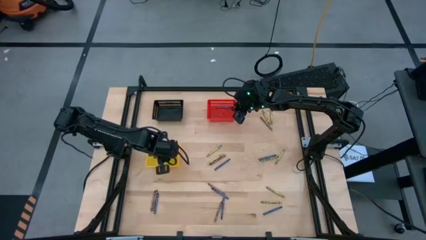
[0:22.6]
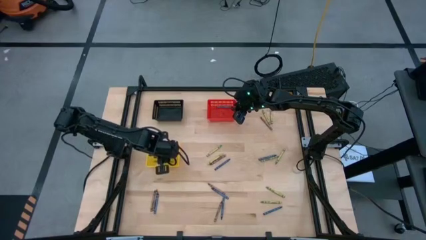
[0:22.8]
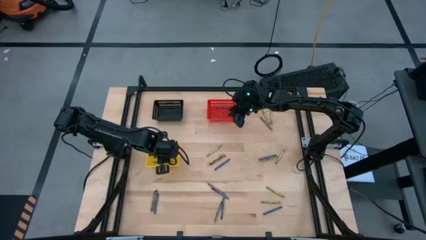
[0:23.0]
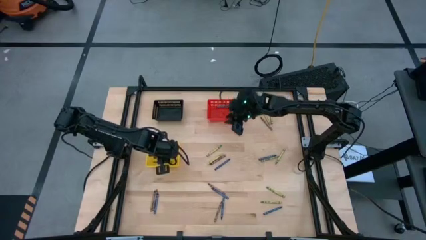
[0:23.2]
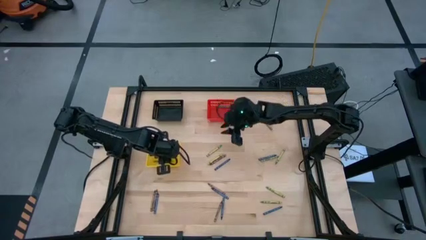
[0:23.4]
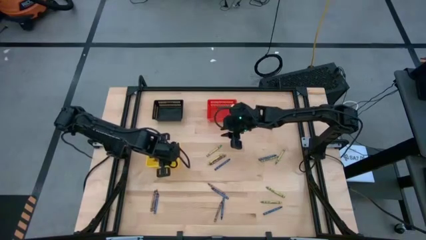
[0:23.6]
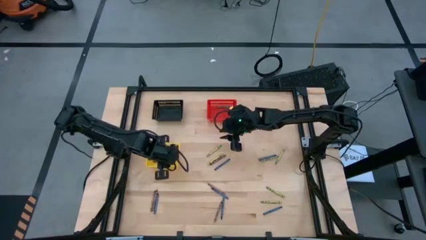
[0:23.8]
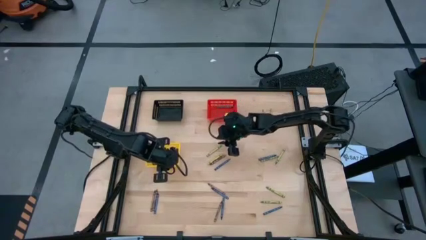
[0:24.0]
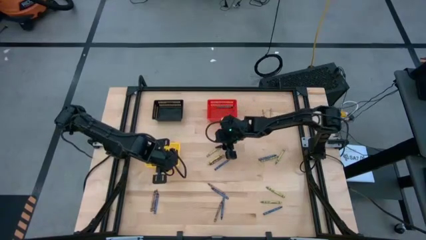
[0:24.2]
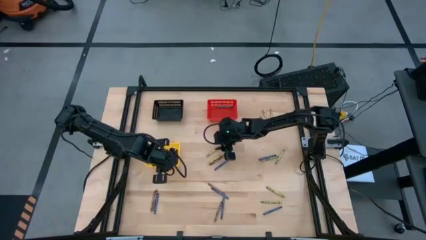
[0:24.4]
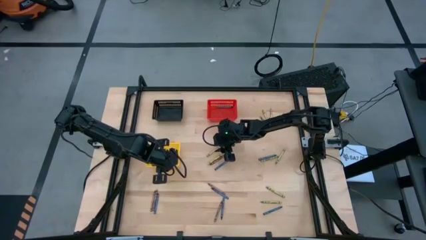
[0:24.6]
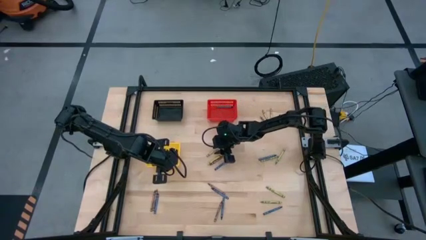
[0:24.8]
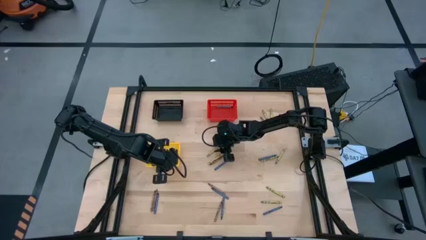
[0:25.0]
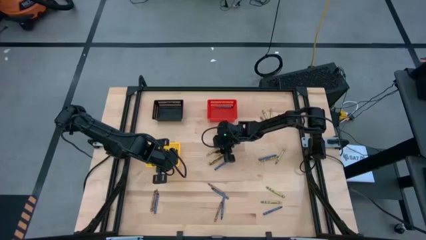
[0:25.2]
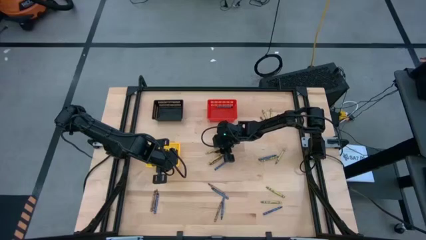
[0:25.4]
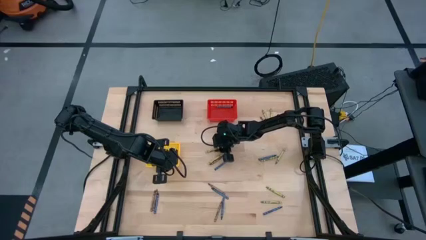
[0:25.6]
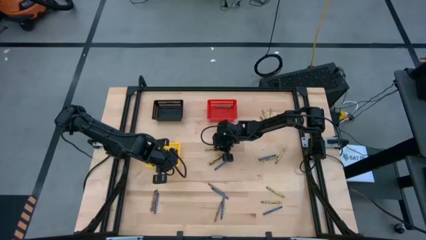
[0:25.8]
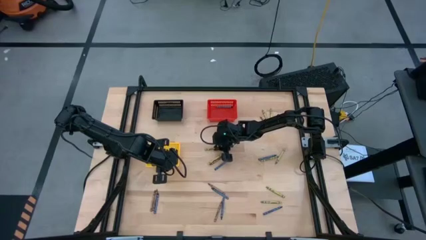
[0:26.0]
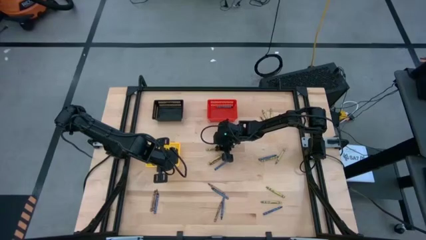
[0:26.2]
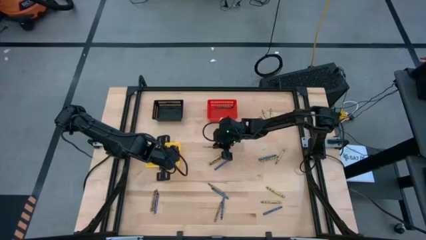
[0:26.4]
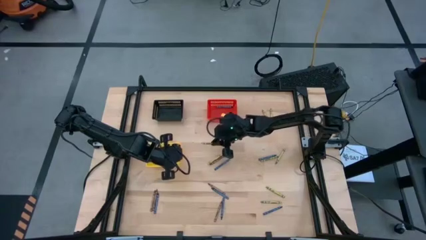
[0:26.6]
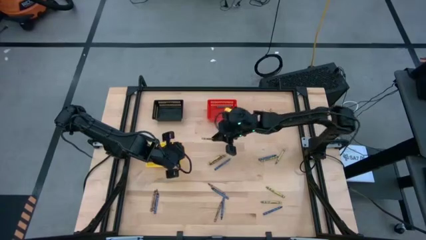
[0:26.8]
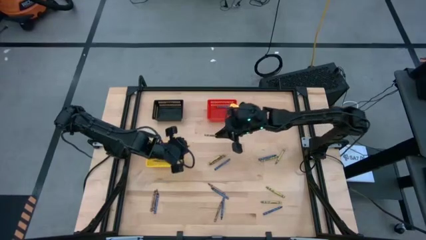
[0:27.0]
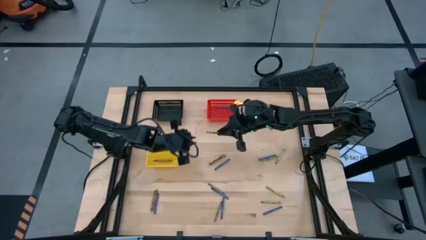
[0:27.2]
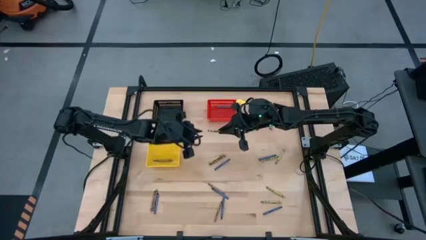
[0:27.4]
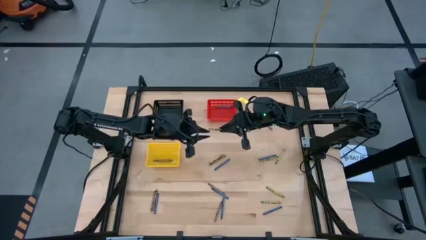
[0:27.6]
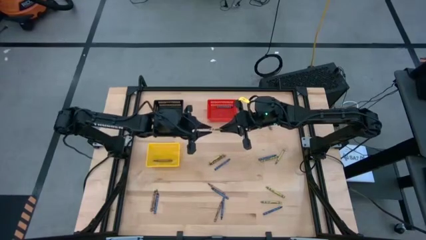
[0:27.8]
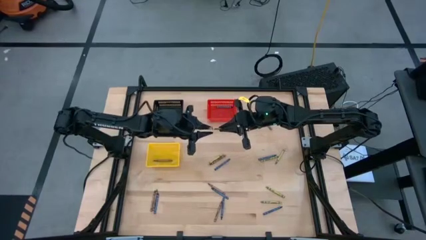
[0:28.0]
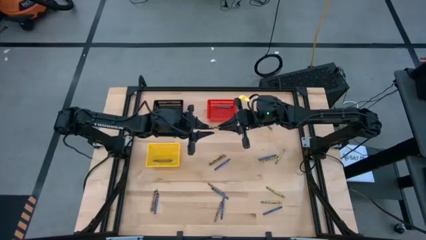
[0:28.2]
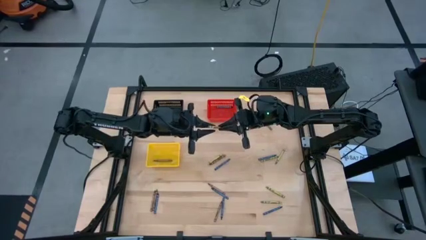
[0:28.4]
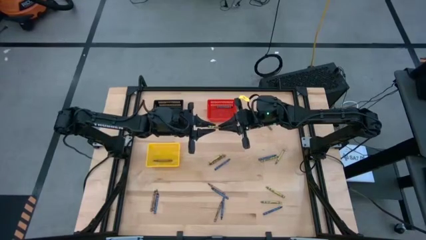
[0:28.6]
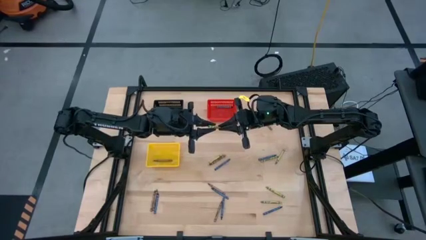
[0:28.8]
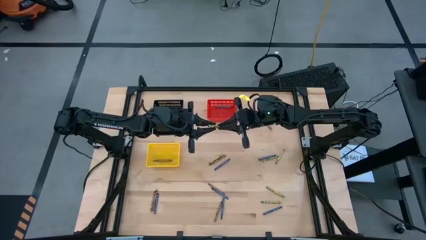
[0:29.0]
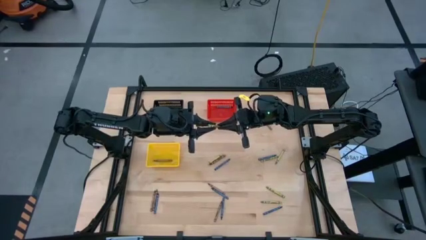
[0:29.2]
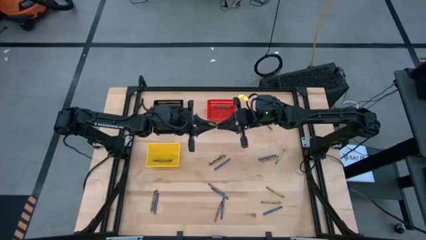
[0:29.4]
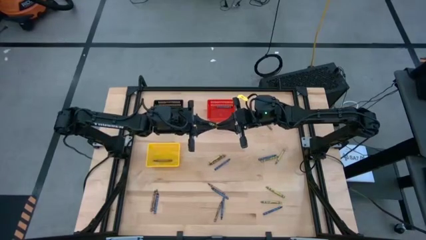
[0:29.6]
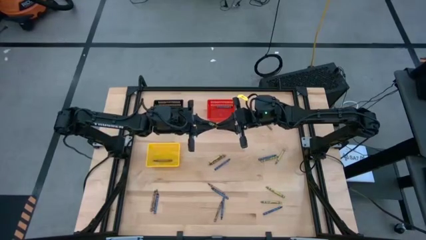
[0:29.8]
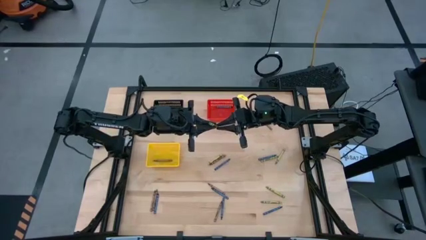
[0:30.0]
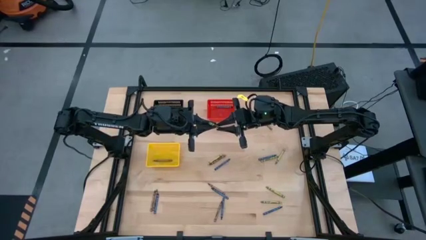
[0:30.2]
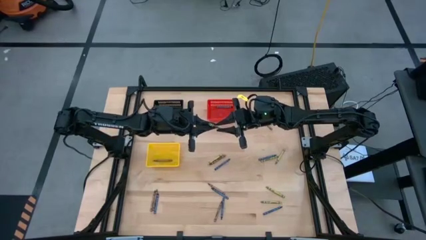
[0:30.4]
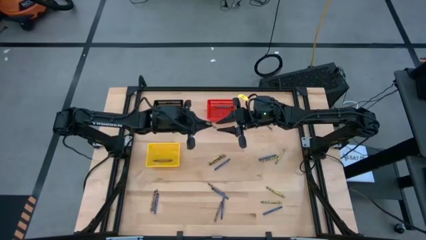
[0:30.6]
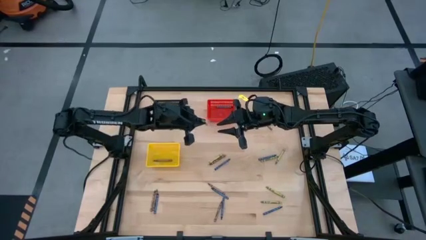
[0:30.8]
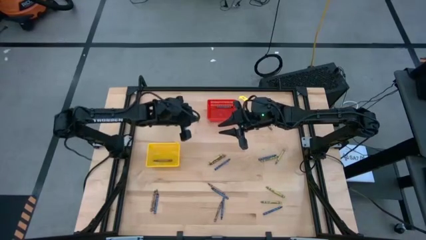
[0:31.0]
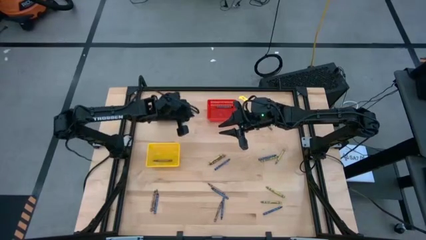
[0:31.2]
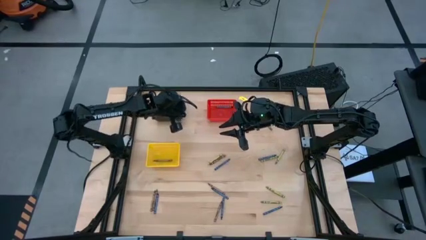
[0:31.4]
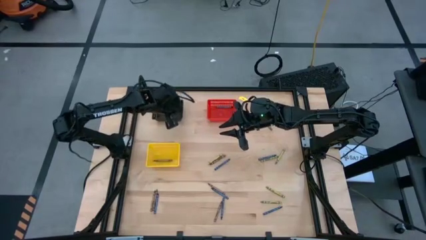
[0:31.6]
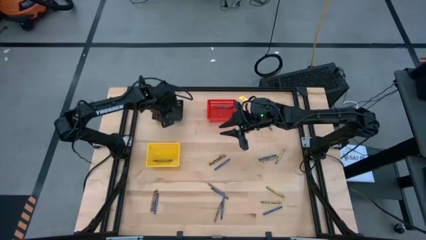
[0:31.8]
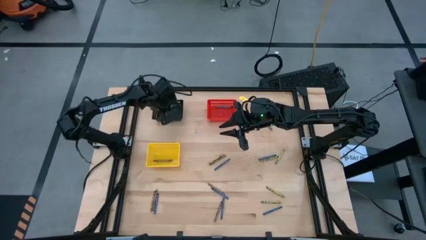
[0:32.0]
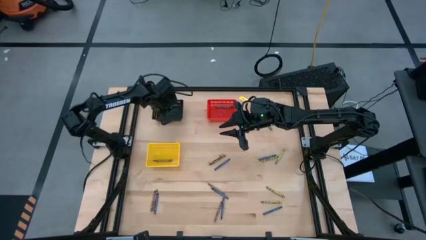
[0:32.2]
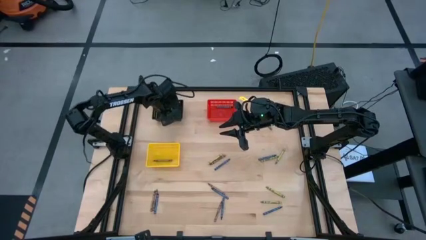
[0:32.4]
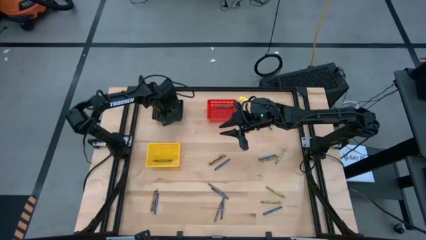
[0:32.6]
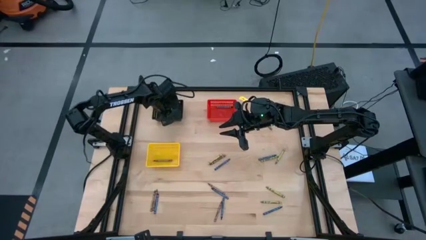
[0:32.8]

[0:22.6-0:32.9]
Task: Sort crayons
Put the green crayon into the black basket

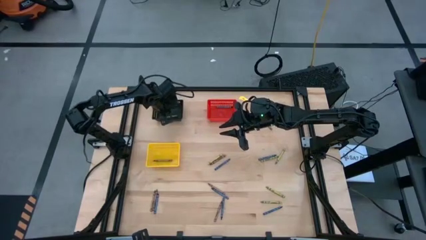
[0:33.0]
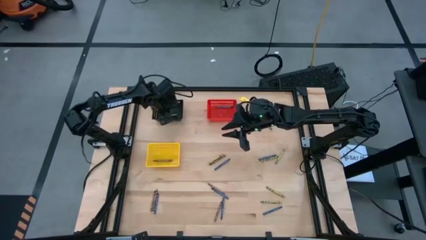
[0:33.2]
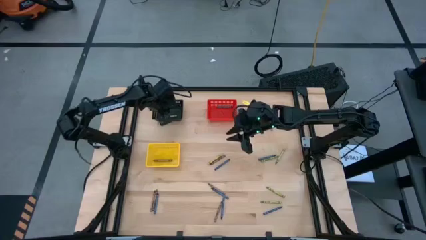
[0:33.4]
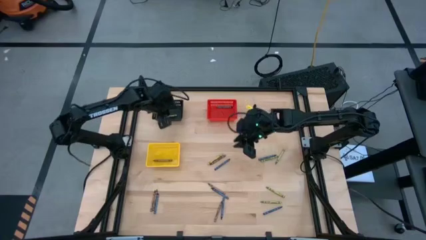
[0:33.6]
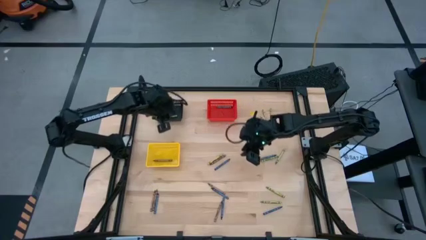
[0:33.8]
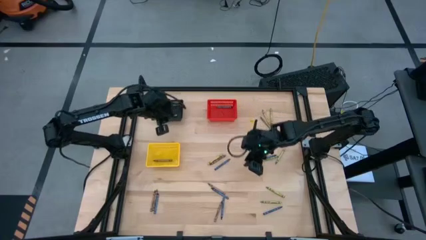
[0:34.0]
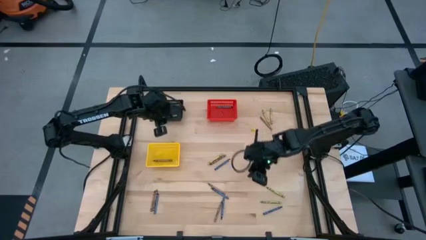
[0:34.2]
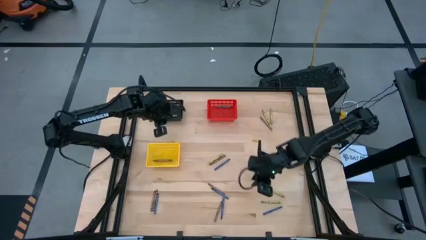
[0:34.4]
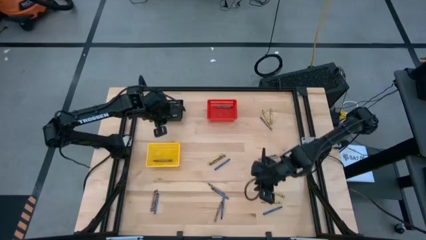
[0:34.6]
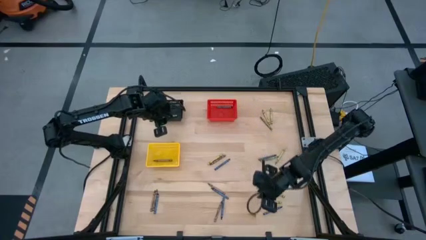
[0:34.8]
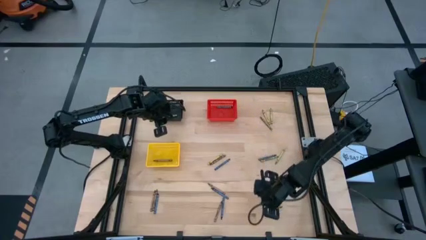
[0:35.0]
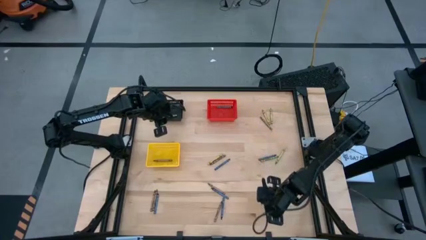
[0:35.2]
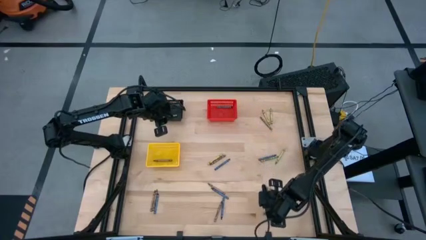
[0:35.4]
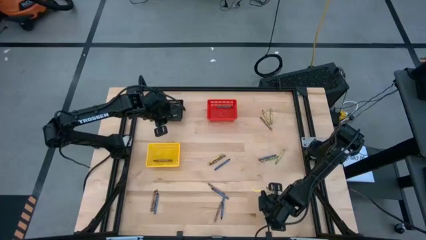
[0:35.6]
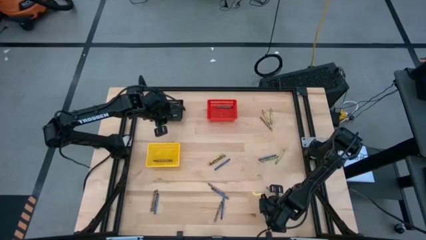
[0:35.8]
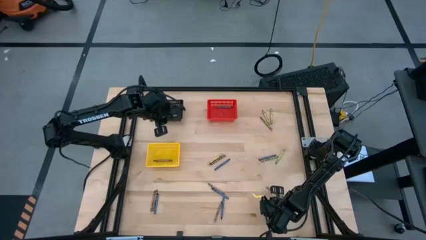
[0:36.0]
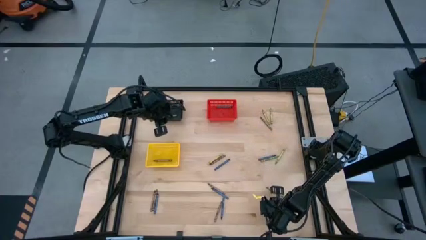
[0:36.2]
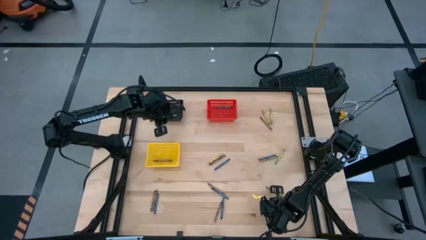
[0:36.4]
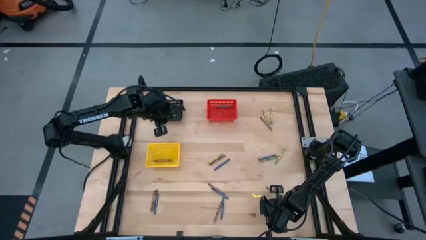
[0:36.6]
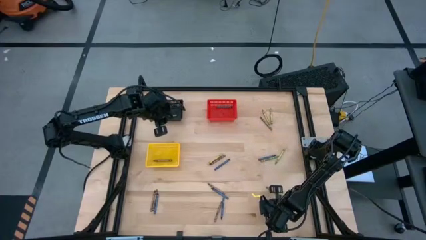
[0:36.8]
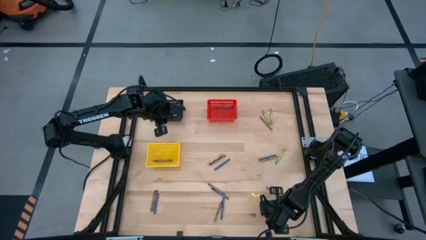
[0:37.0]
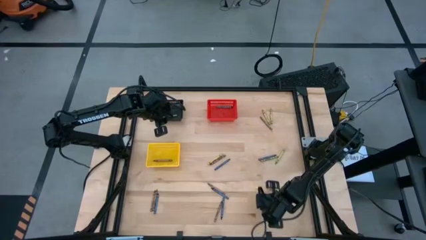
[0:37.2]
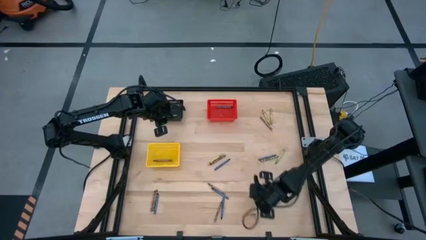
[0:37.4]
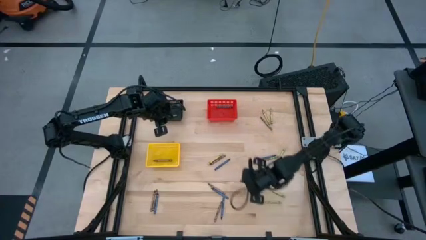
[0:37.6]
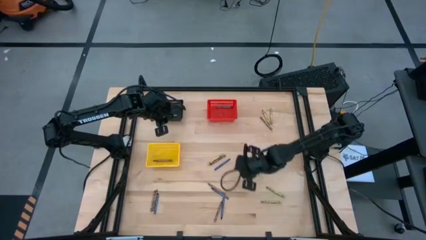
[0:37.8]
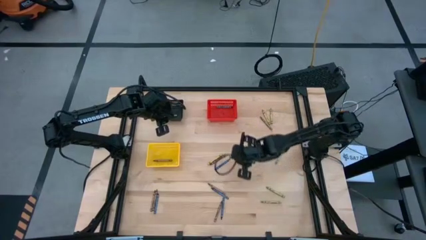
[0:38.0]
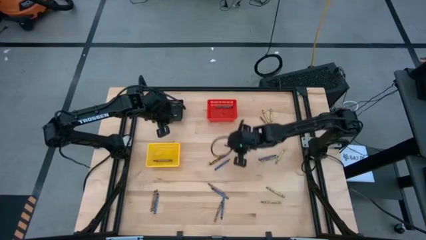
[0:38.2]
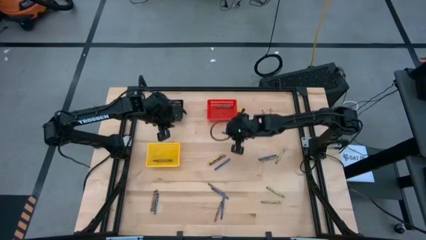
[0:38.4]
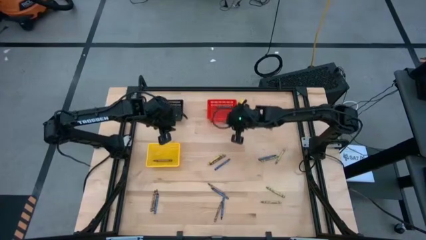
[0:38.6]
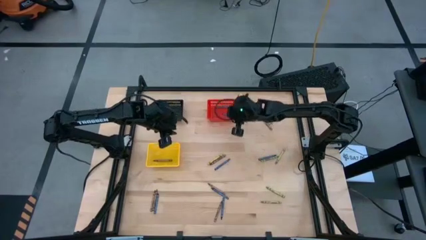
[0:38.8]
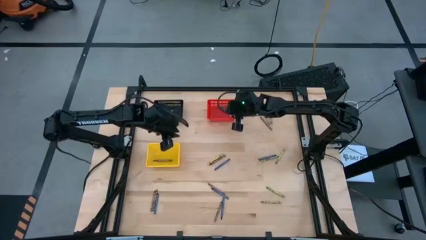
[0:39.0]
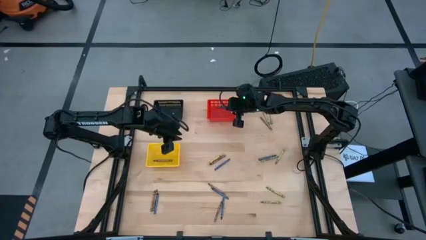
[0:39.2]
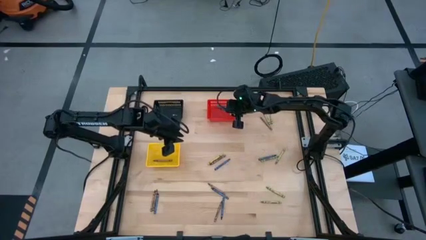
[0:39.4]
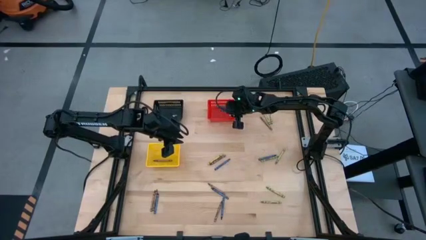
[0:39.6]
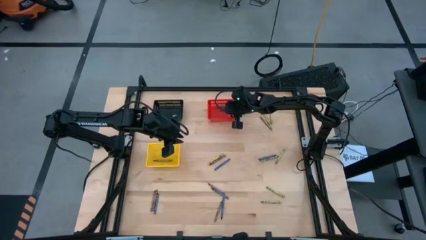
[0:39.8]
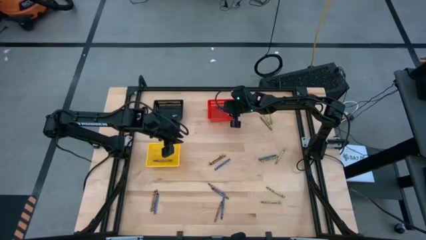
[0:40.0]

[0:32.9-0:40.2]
Put the blue crayon into the red basket
